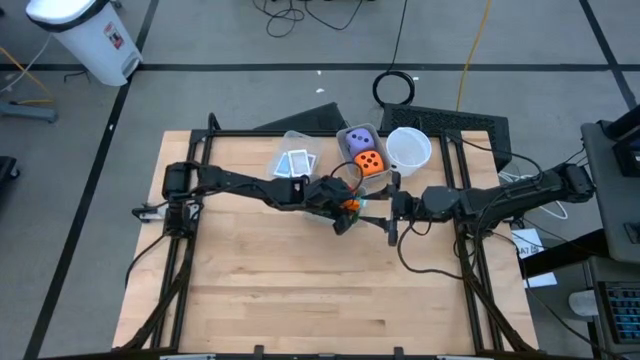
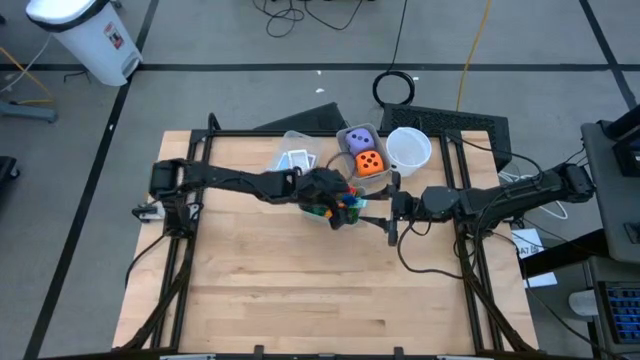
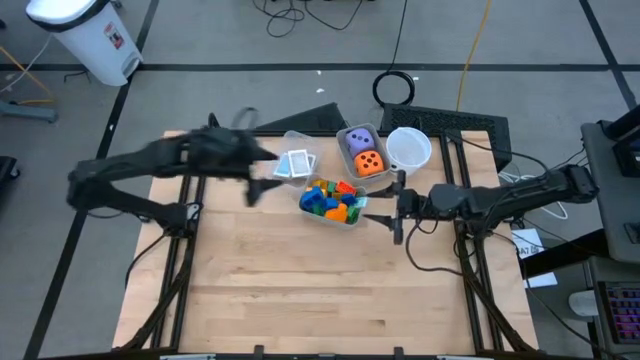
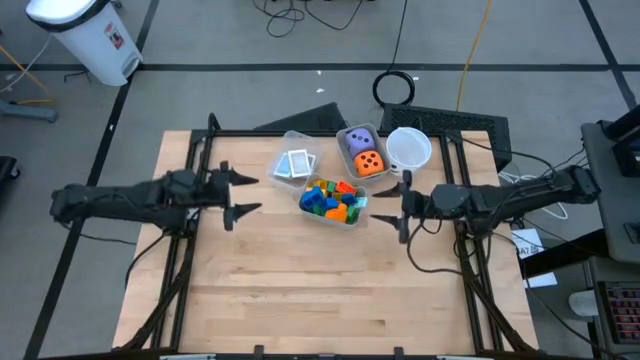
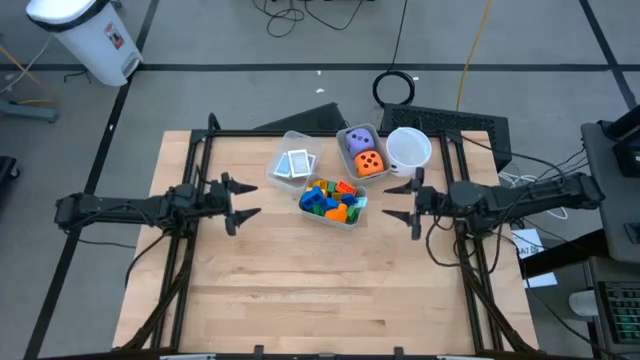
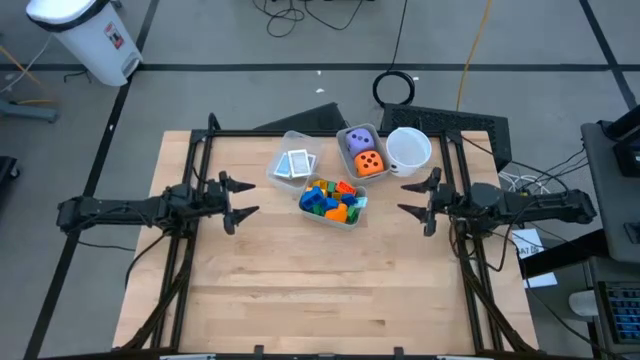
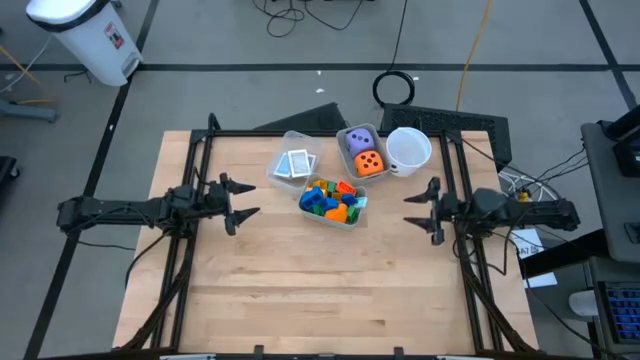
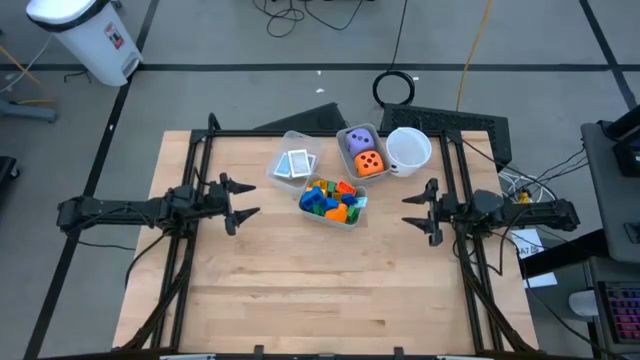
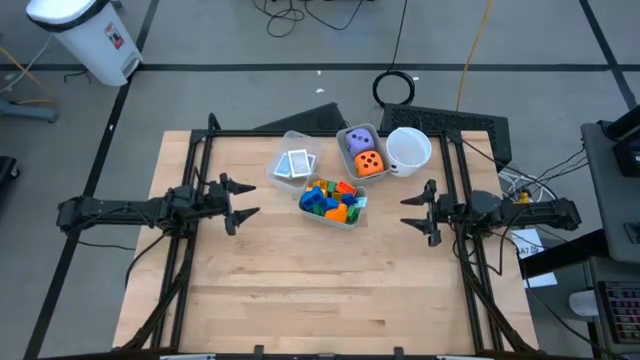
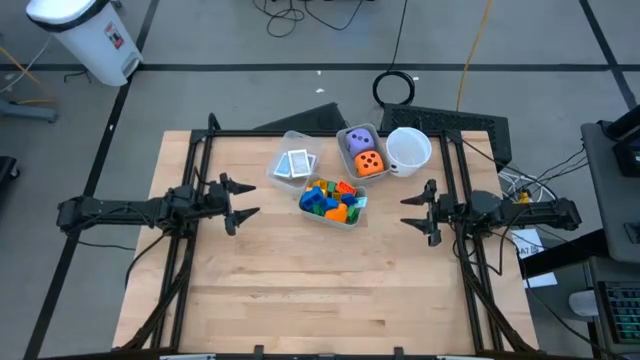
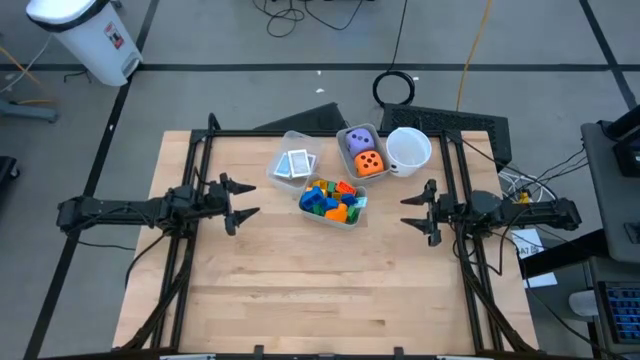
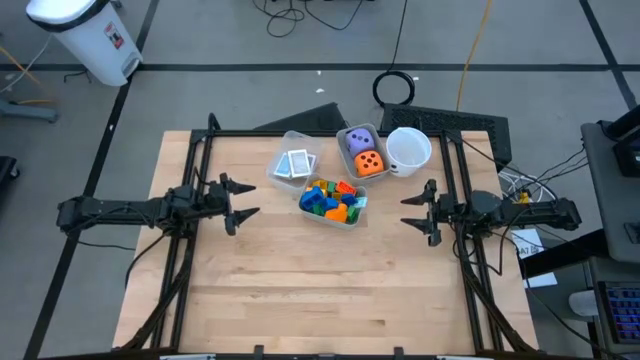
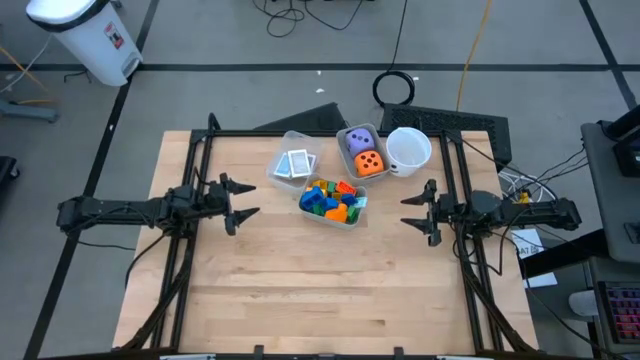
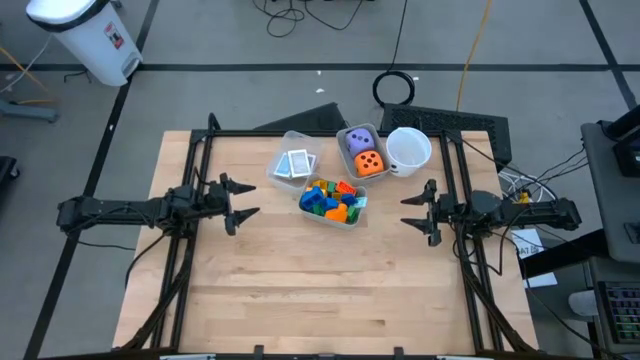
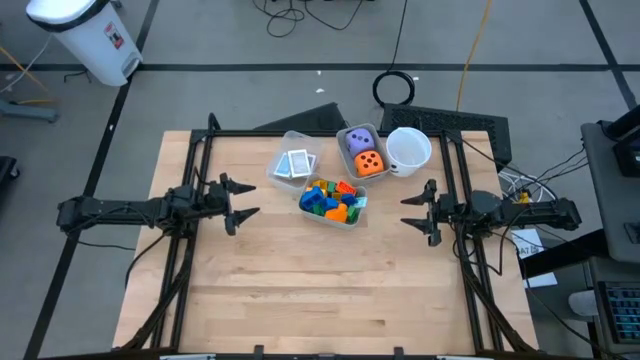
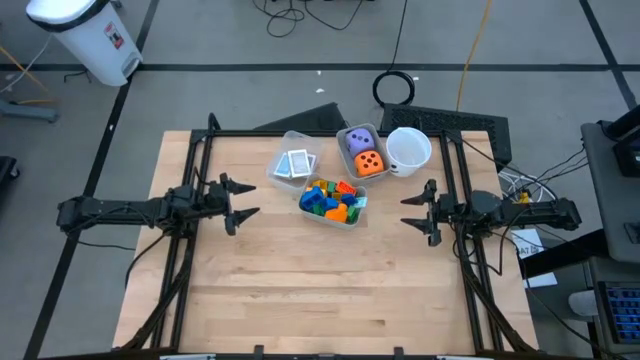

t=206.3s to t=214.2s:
Task: Pick & Place Toys
Return to Home Position

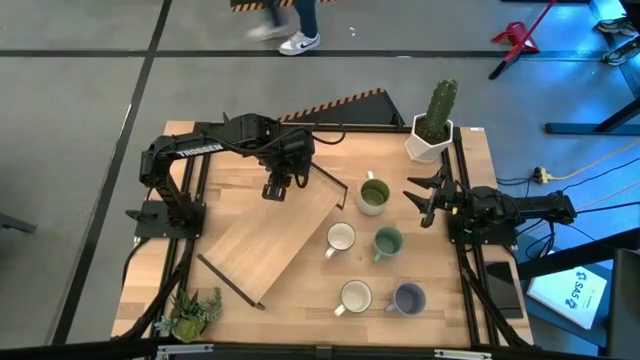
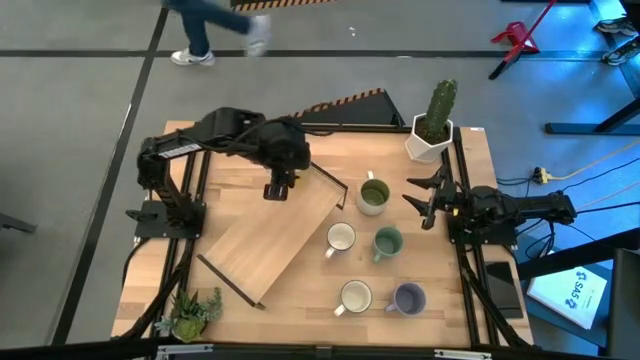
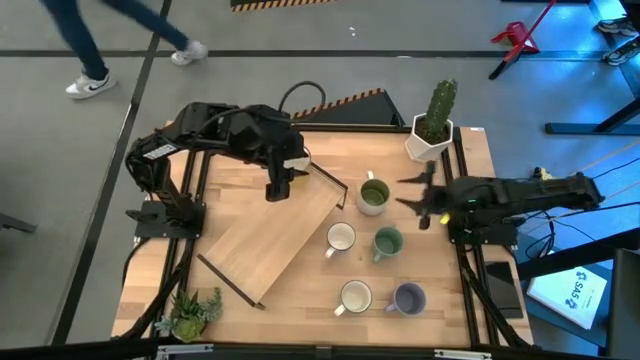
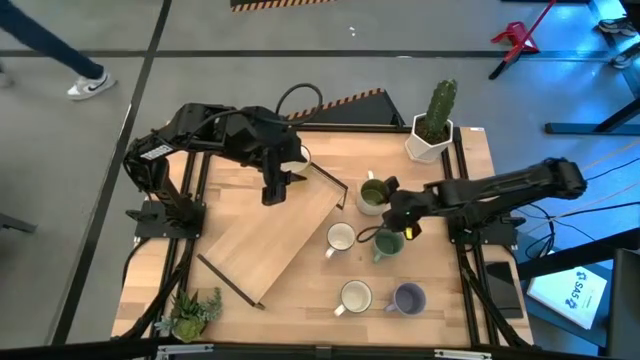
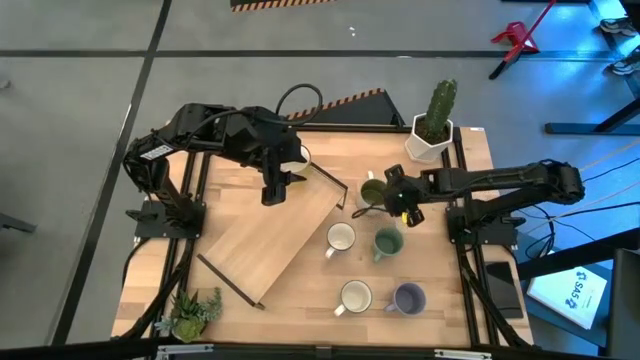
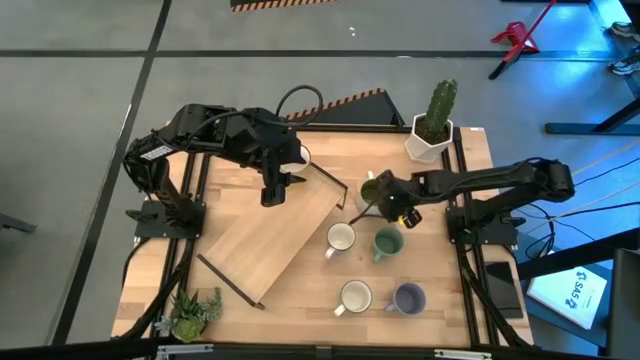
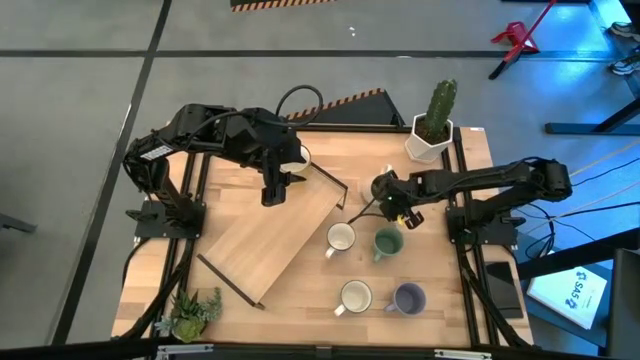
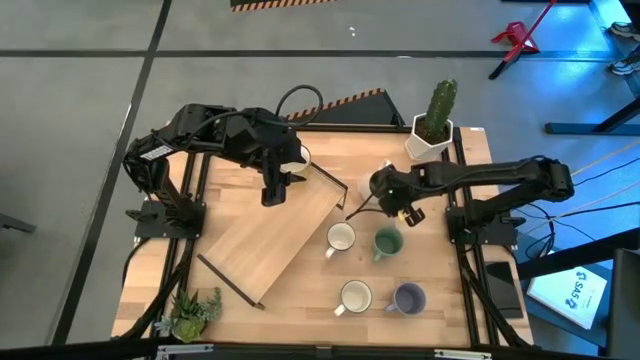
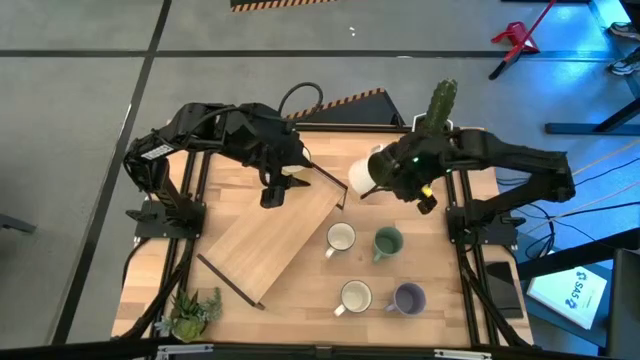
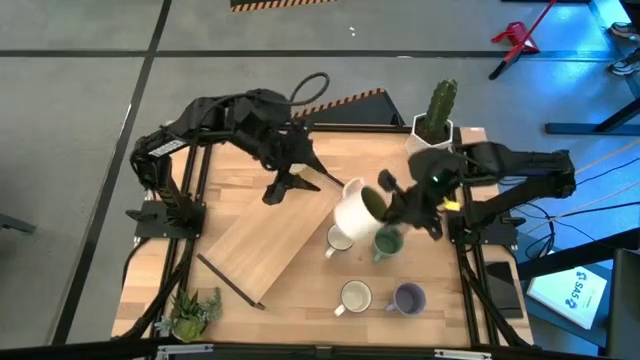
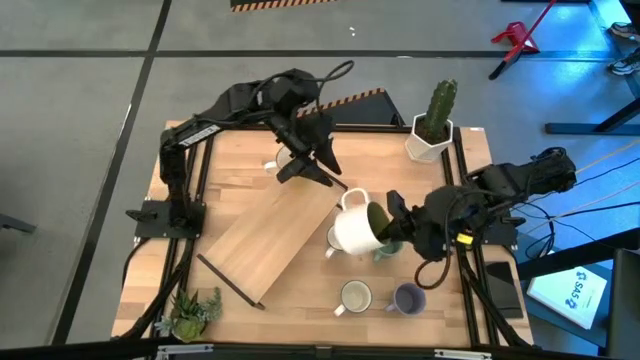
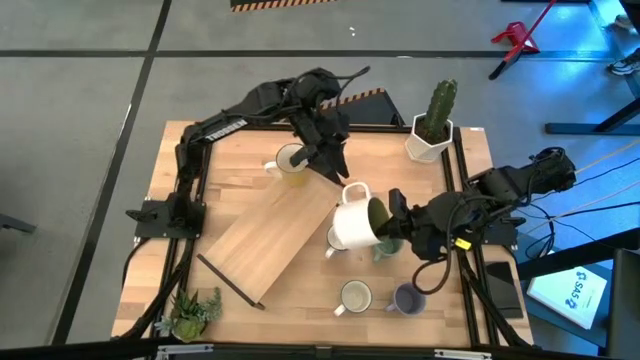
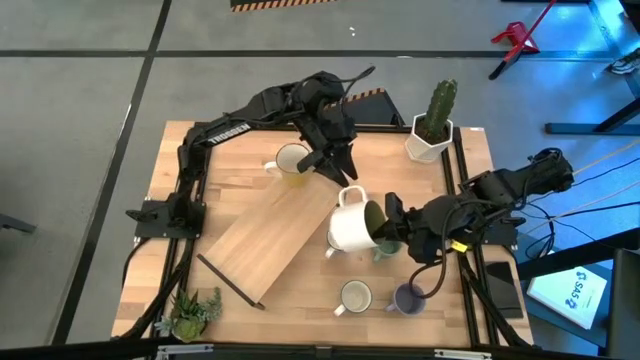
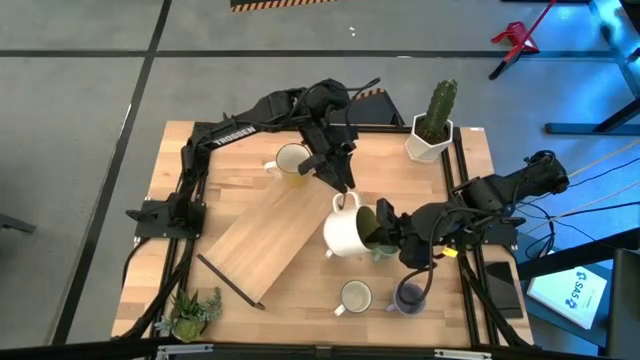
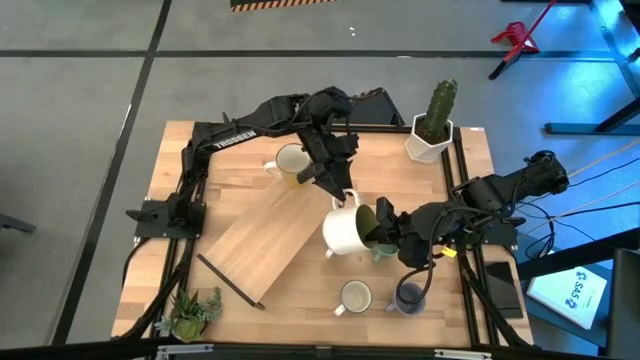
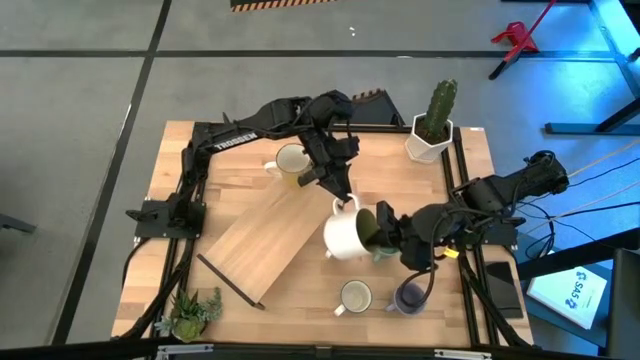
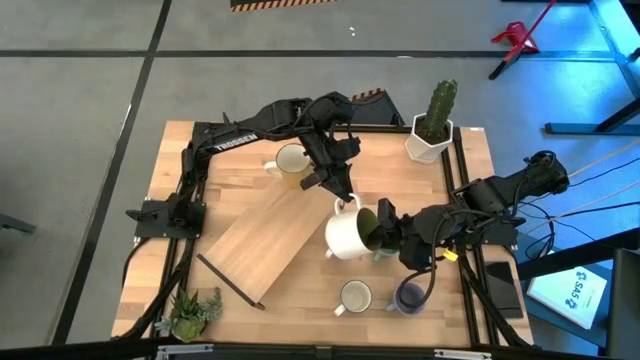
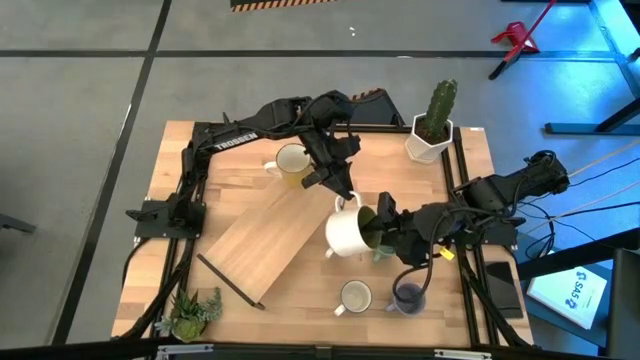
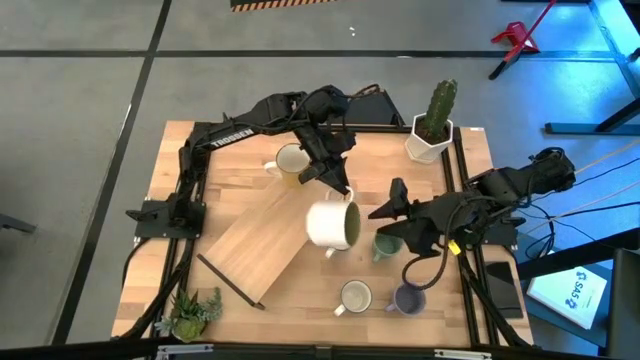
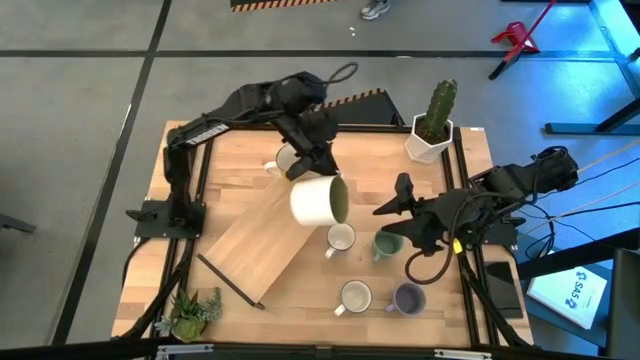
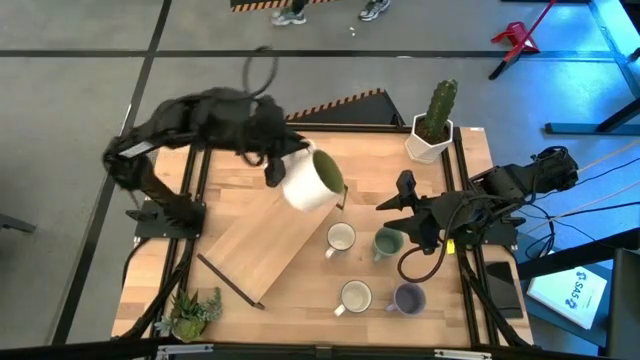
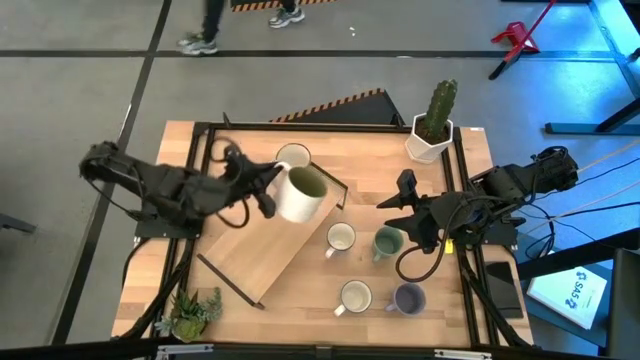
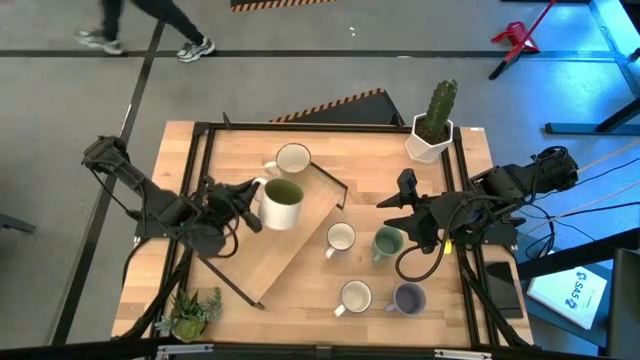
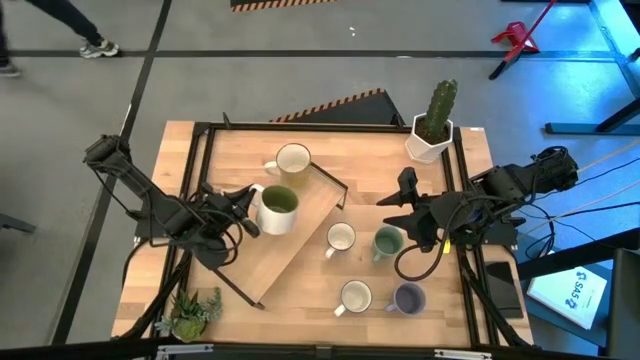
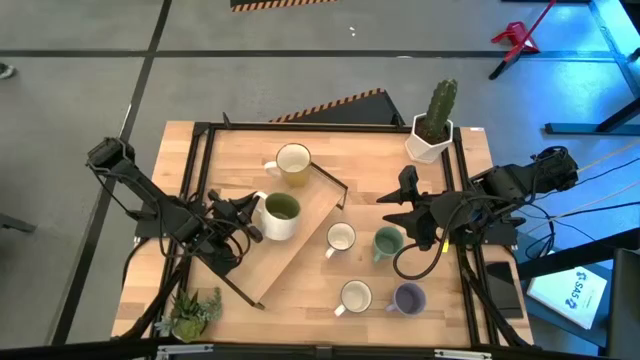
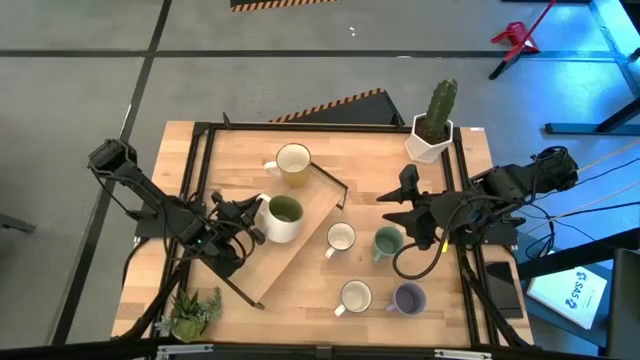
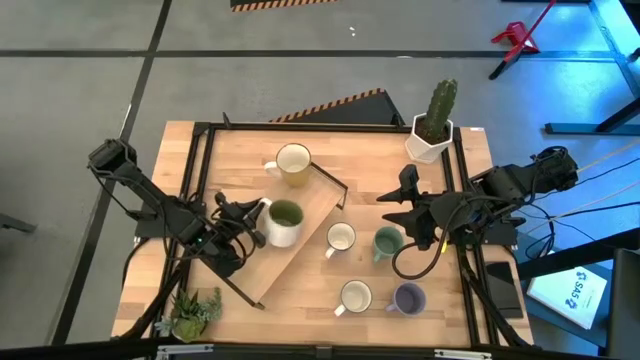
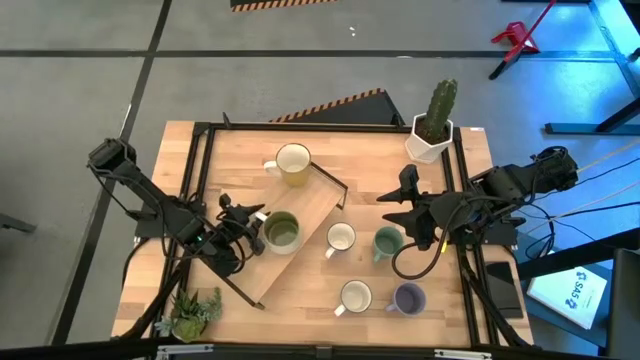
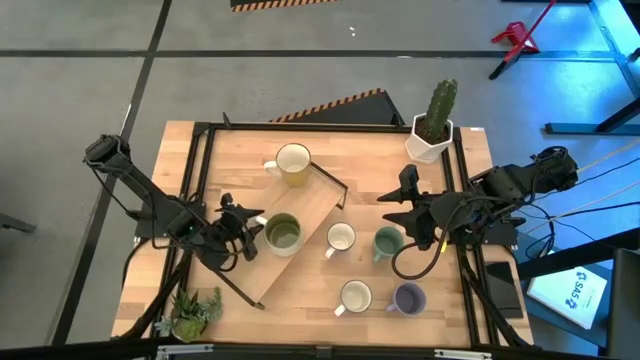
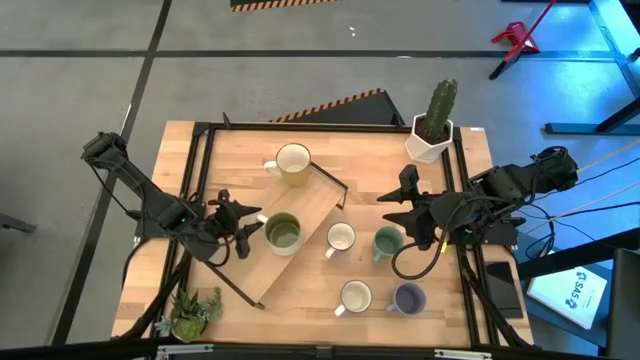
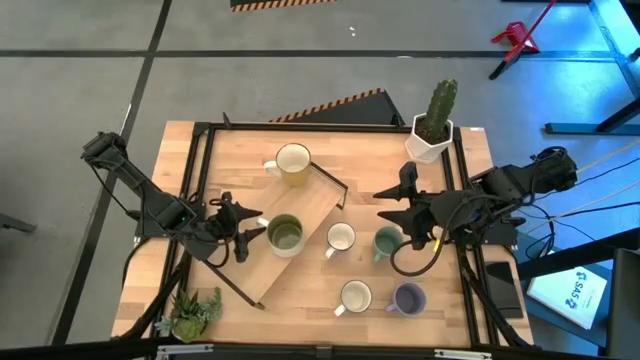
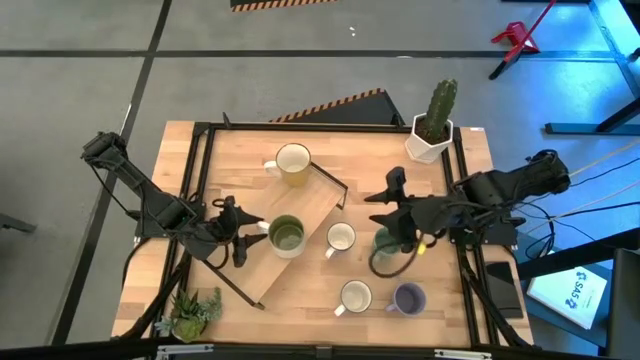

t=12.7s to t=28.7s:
Task: Place coffee mugs
Put the white mug on the shelf
